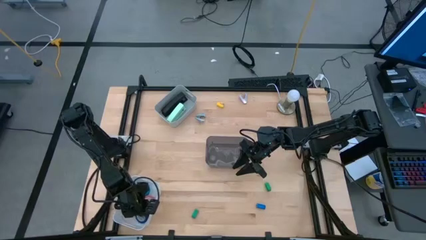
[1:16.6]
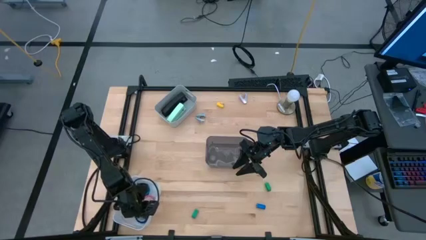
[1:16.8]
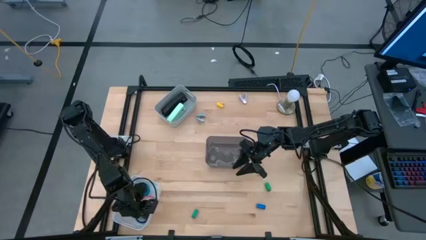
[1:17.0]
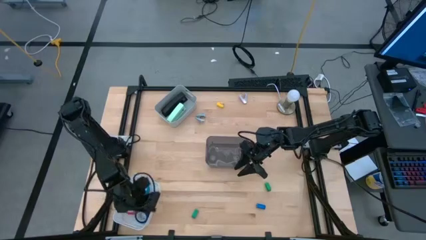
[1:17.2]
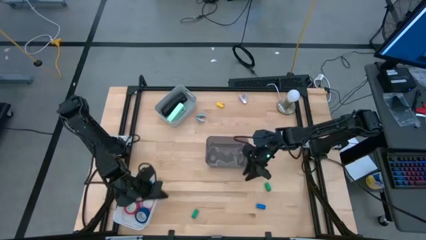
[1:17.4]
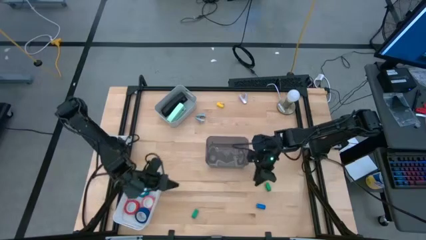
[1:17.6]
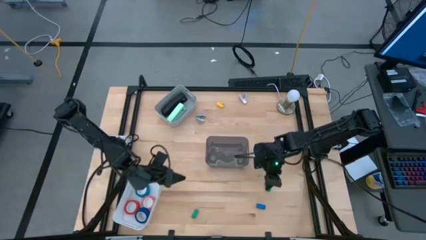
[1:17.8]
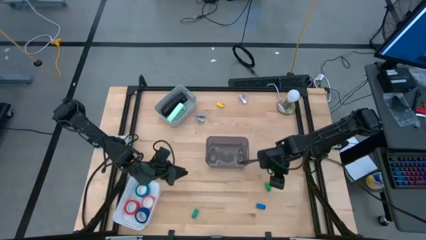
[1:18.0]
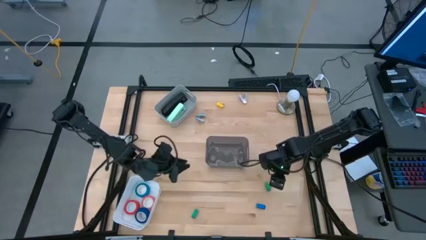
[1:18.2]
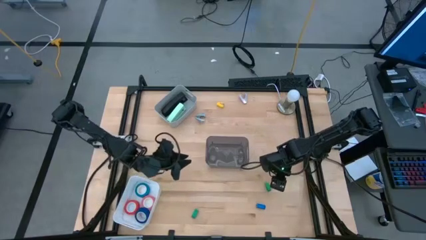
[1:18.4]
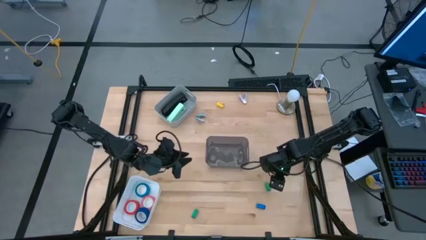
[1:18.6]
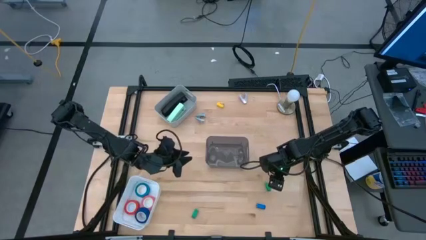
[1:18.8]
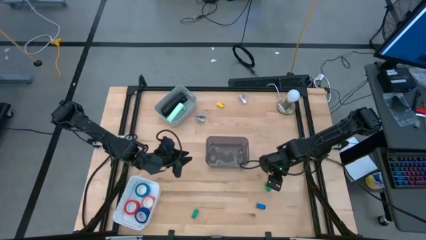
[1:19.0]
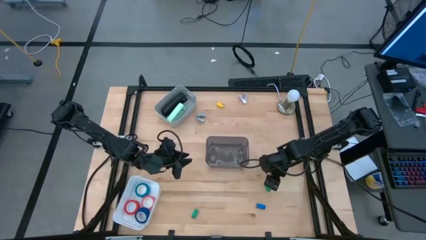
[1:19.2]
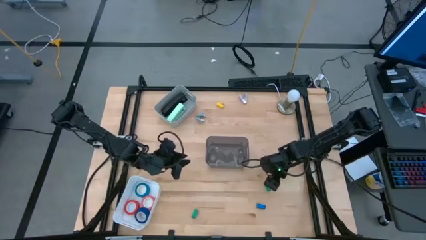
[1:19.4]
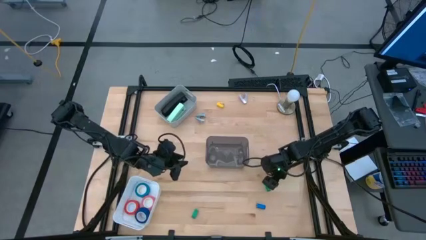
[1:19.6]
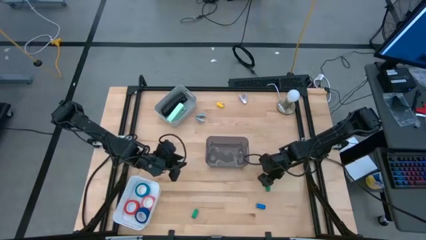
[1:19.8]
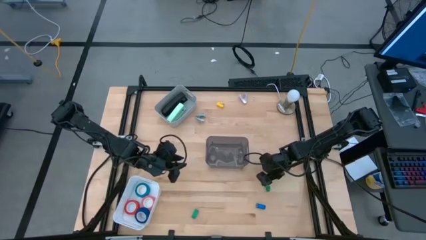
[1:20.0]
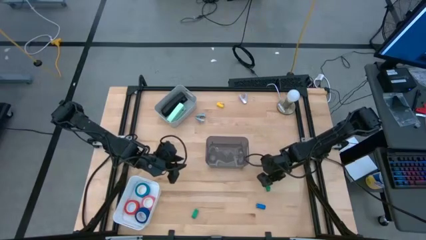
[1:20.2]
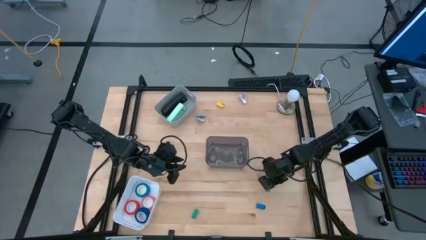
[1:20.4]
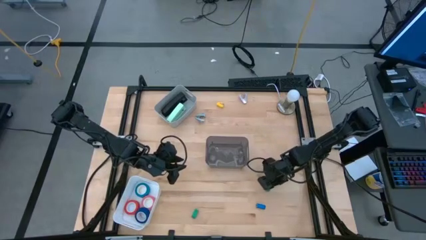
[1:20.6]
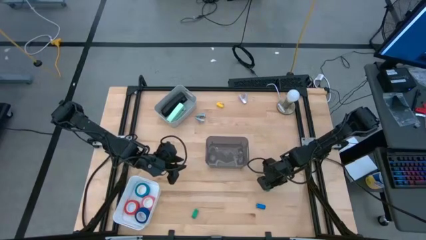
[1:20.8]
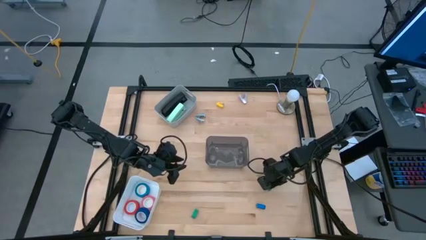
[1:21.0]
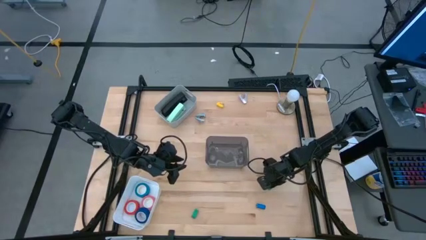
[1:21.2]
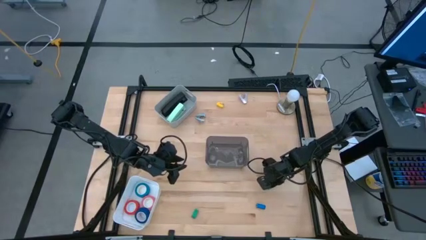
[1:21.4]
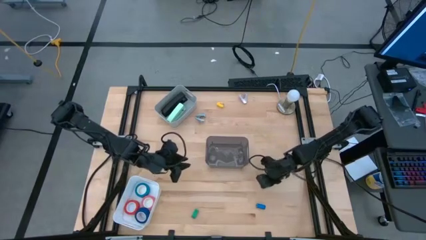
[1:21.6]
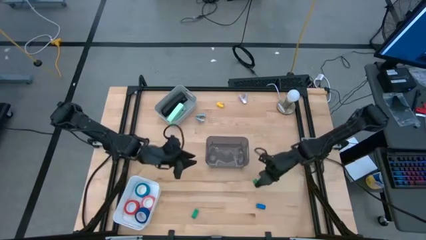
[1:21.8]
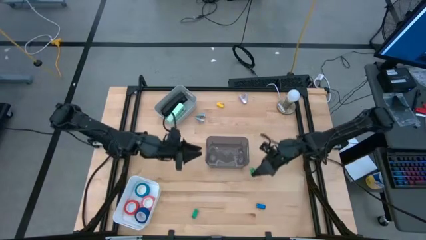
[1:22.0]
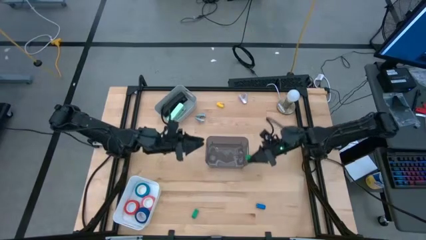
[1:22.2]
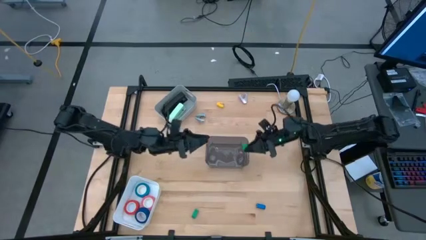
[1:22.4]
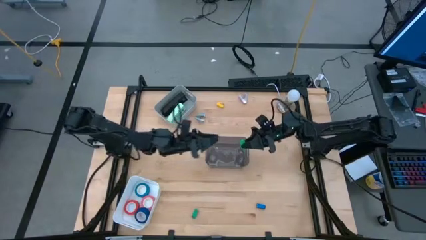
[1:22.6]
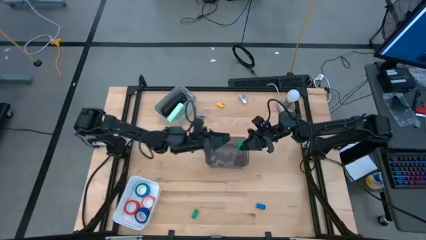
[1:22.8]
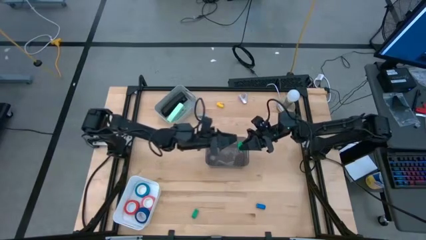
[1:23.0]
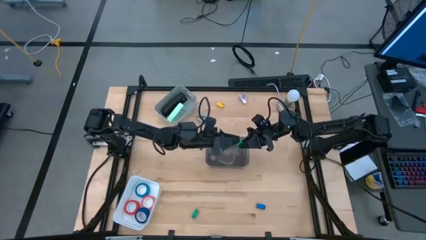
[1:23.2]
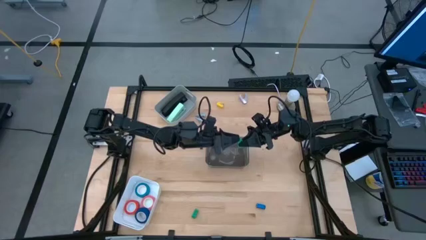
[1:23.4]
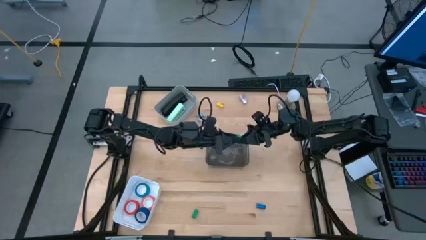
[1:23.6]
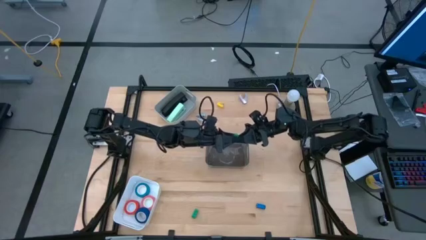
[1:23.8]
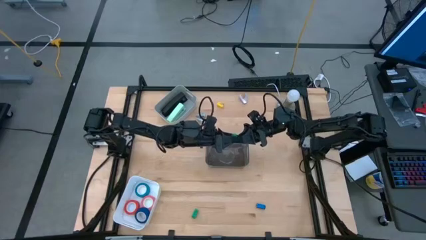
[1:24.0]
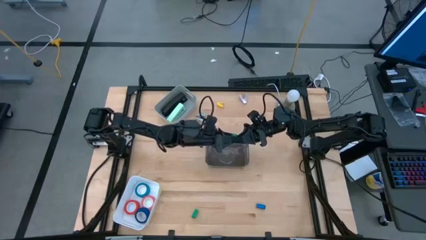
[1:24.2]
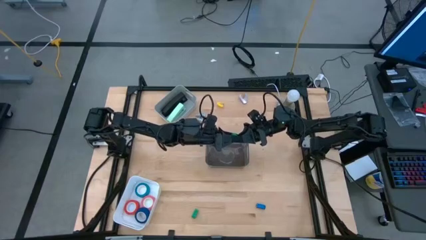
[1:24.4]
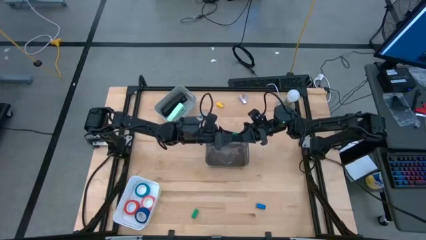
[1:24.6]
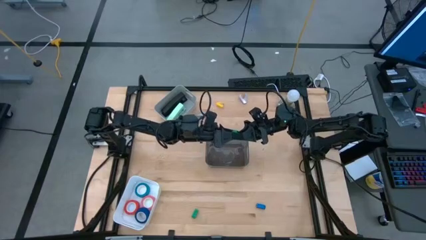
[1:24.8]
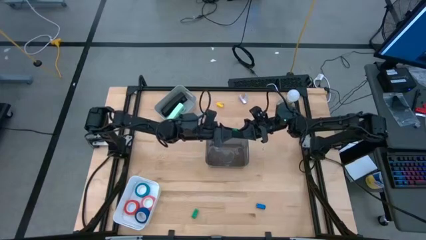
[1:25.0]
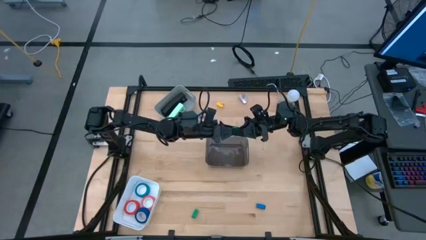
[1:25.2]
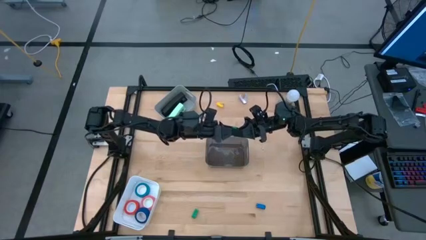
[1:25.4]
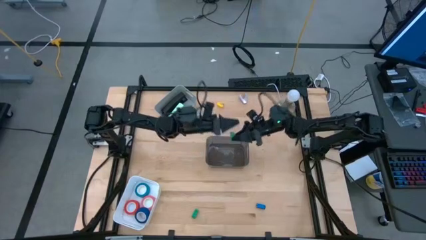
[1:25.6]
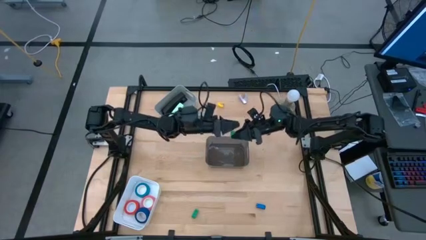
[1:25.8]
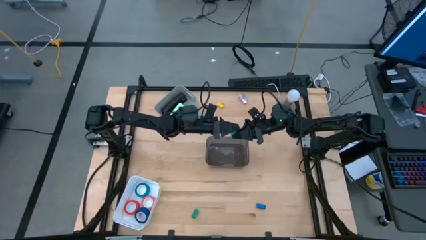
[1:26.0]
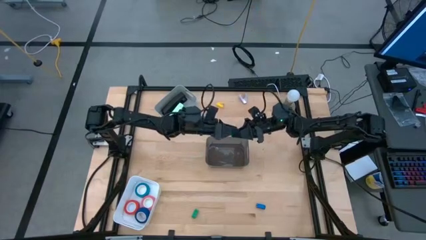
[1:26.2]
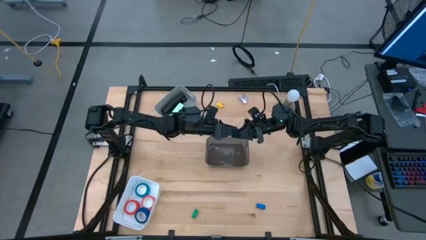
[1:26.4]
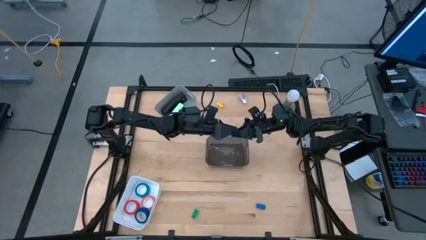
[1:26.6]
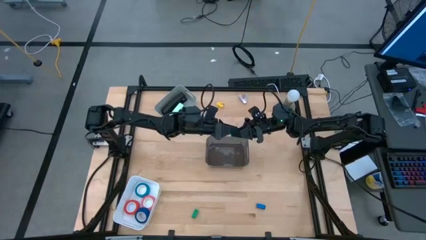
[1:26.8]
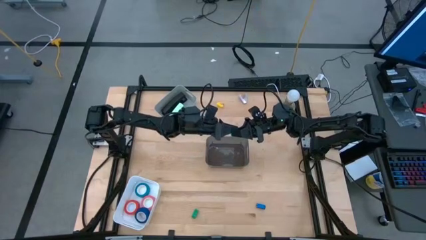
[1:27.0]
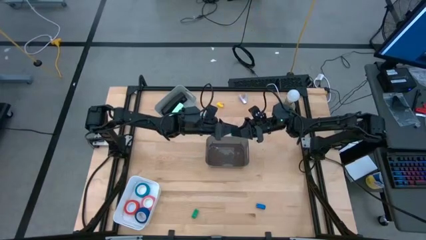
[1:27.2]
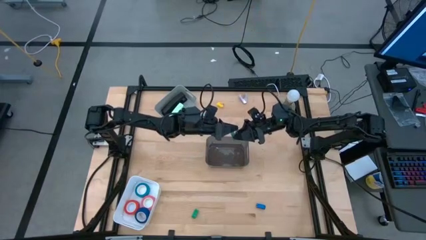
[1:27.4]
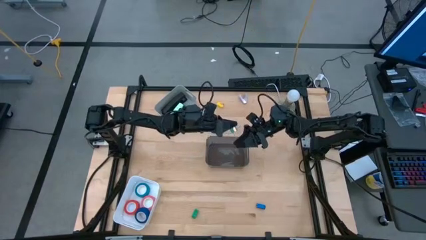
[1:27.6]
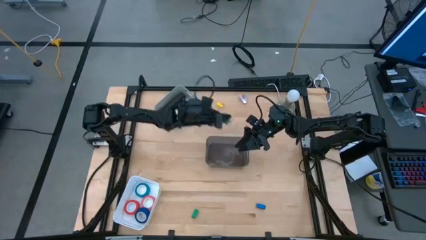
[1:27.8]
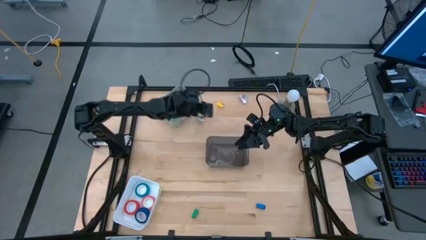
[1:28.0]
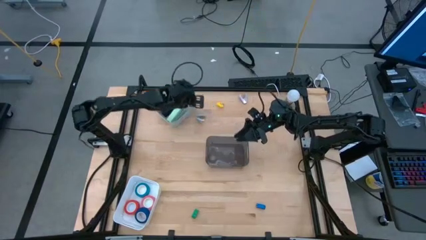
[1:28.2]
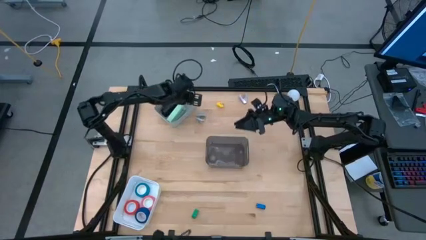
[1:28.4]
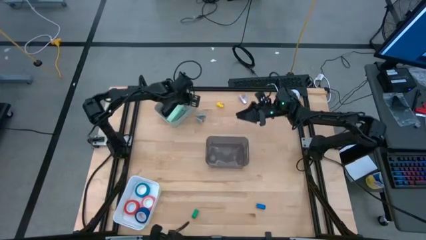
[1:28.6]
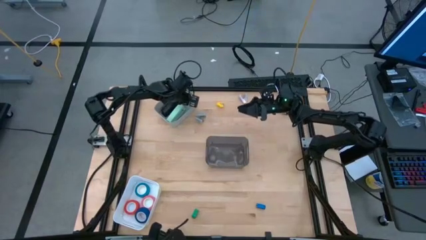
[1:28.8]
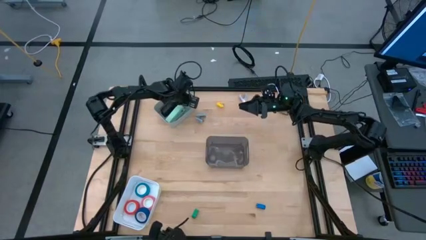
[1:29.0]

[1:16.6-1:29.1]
Task: Pick and place Stapler, Stapler remover, tape
Put the right green stapler into the gray bin

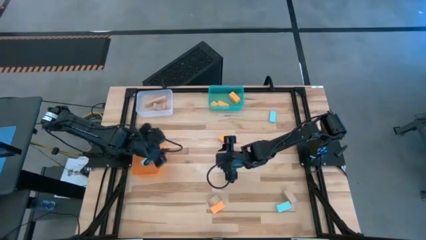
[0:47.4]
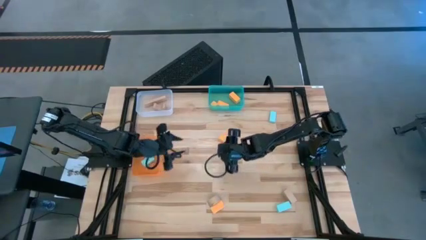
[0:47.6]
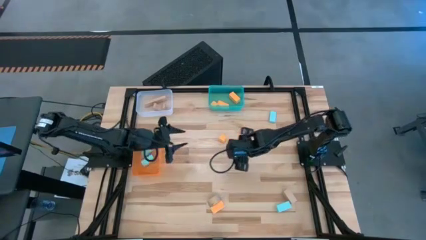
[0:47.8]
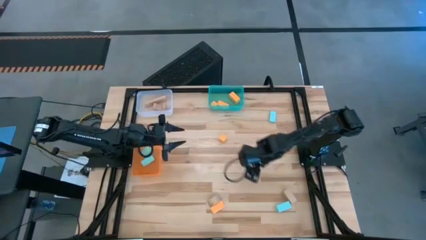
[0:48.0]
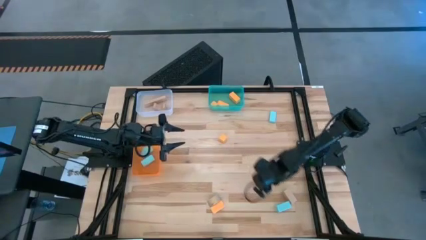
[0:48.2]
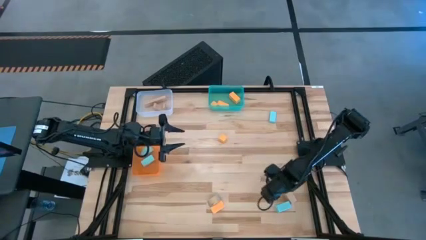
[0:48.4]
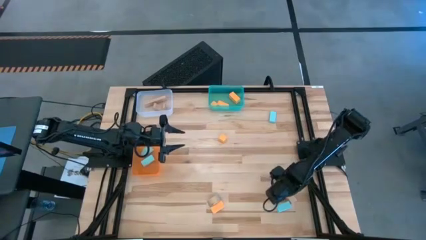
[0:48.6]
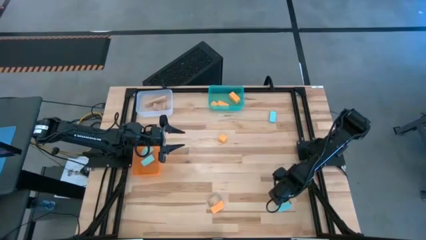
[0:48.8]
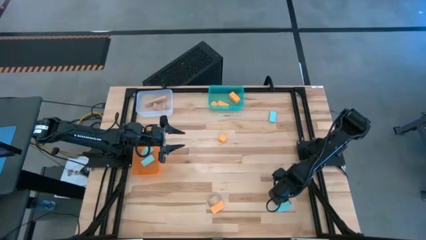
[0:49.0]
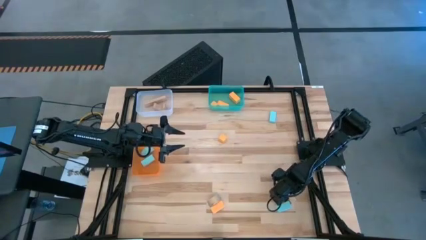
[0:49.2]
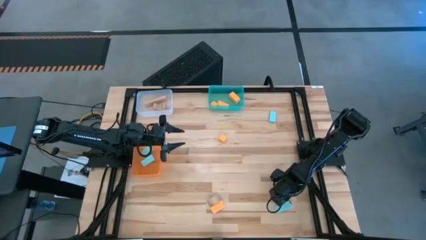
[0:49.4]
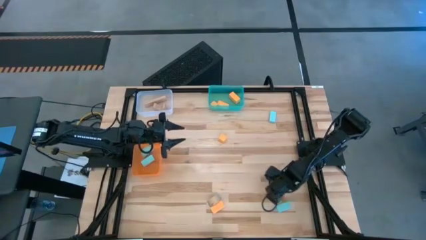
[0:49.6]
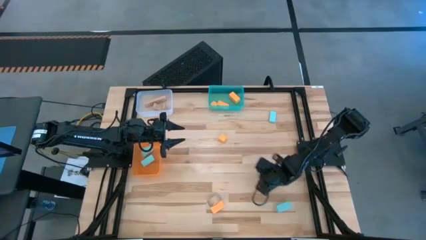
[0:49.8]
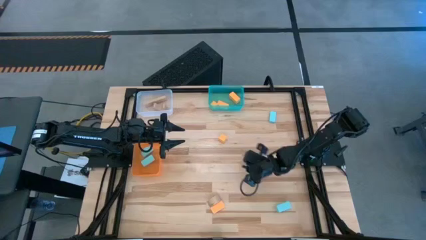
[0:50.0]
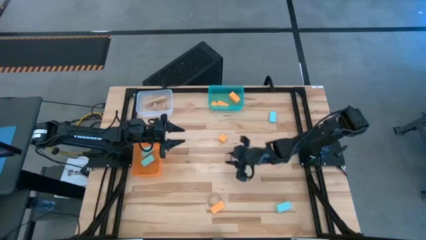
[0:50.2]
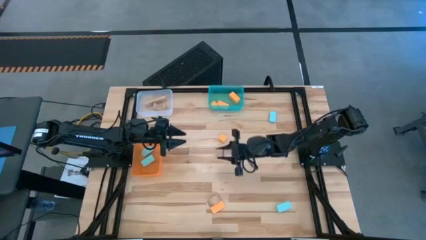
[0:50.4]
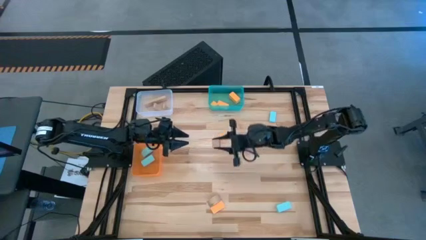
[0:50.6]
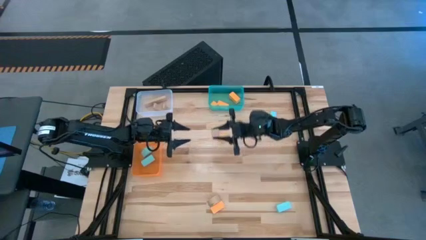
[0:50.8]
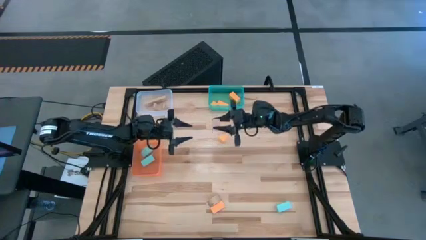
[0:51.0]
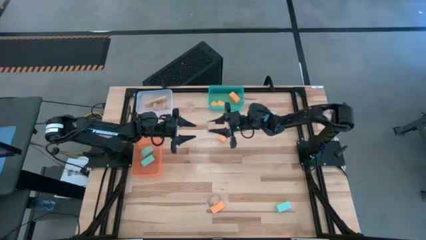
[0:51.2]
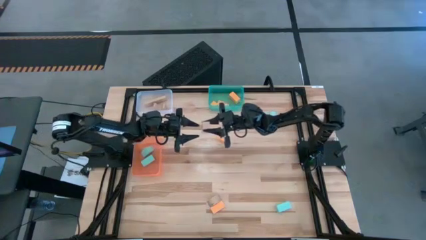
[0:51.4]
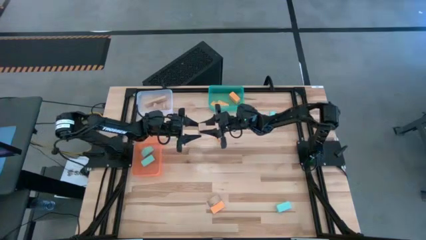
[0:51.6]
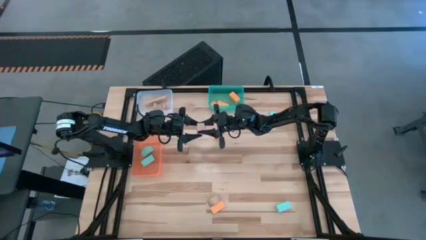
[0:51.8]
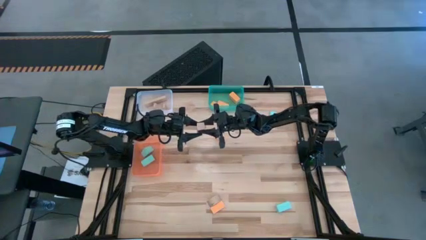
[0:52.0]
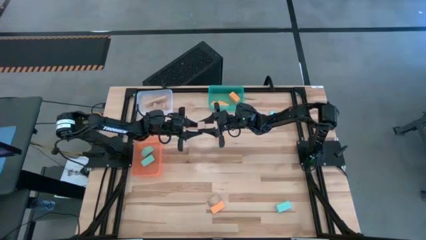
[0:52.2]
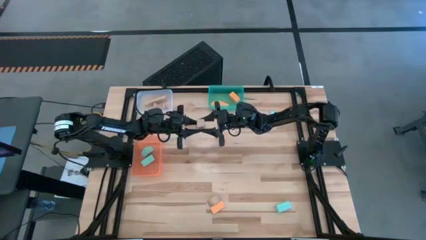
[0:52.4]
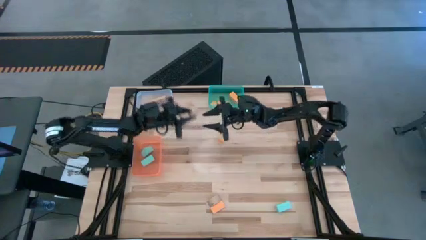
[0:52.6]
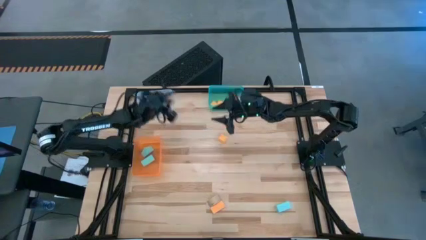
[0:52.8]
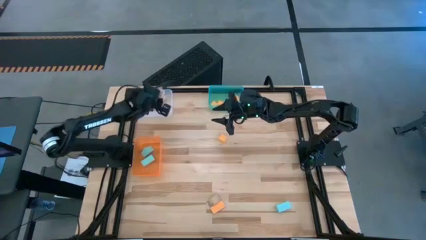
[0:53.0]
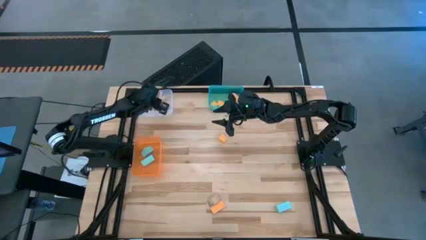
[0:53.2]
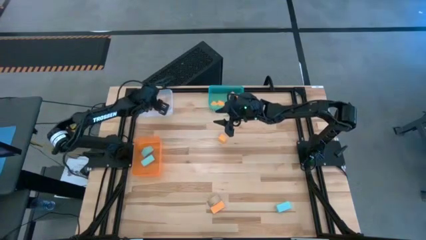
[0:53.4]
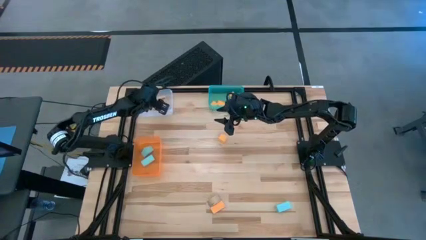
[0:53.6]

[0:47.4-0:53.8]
Task: Sort & place blocks by color
Put the light brown block into the white bin
